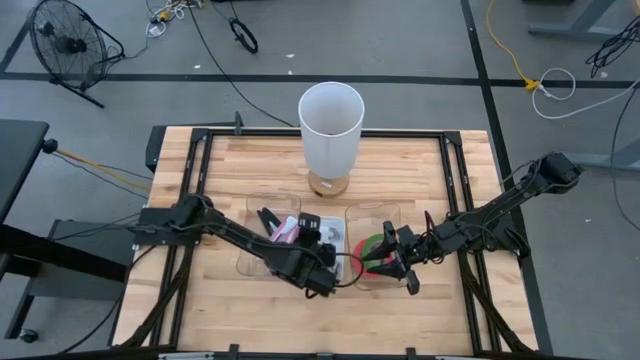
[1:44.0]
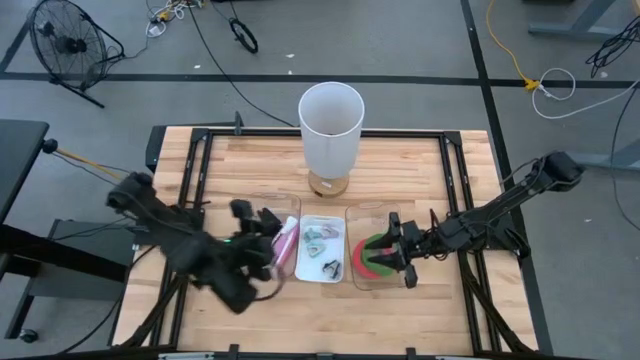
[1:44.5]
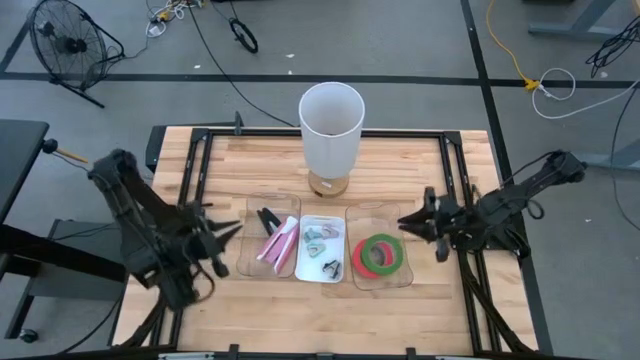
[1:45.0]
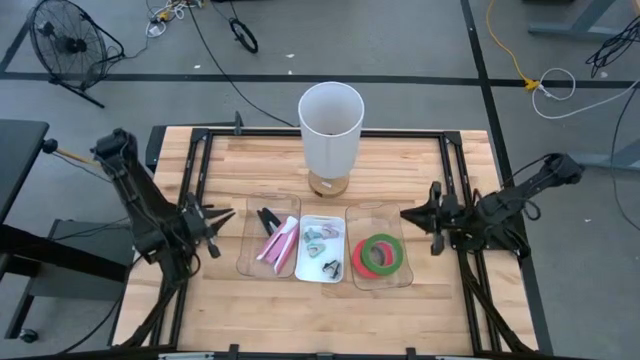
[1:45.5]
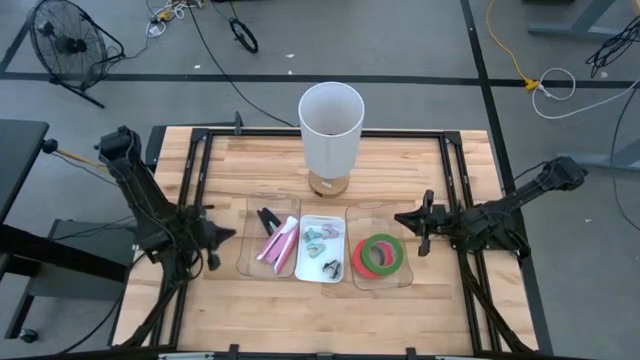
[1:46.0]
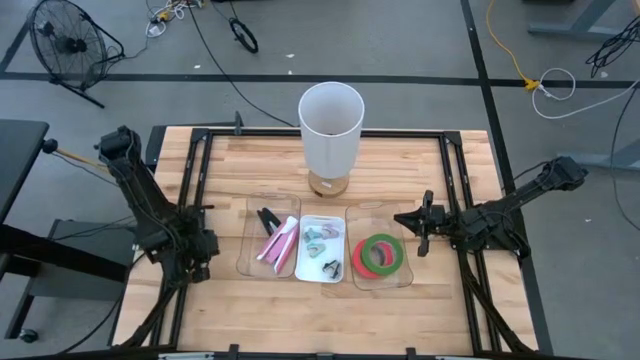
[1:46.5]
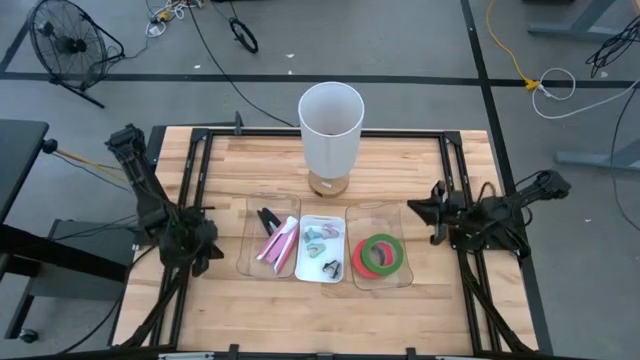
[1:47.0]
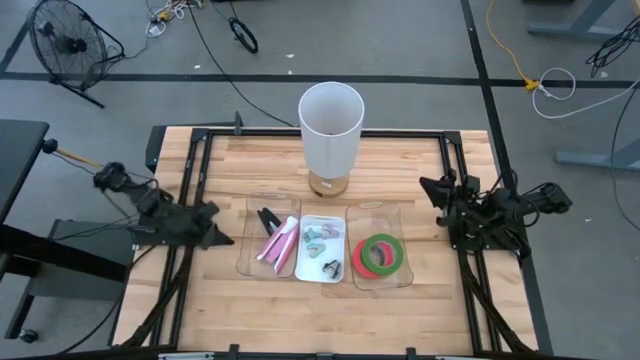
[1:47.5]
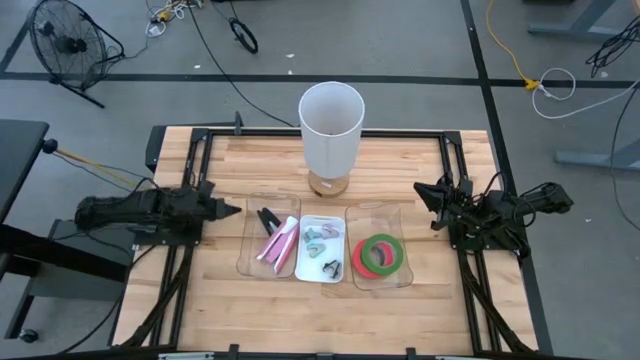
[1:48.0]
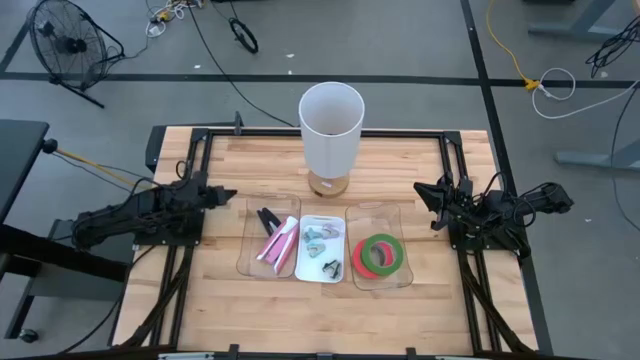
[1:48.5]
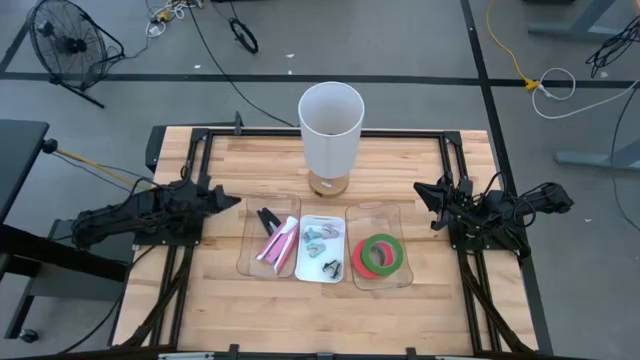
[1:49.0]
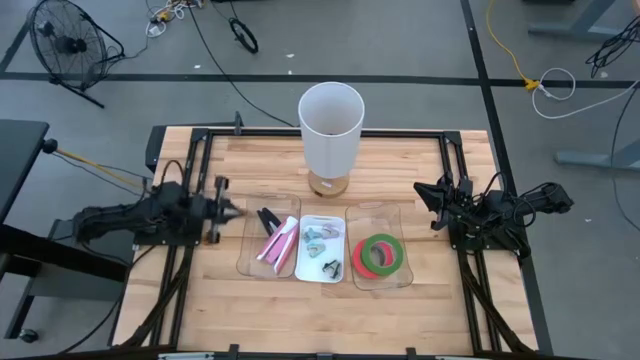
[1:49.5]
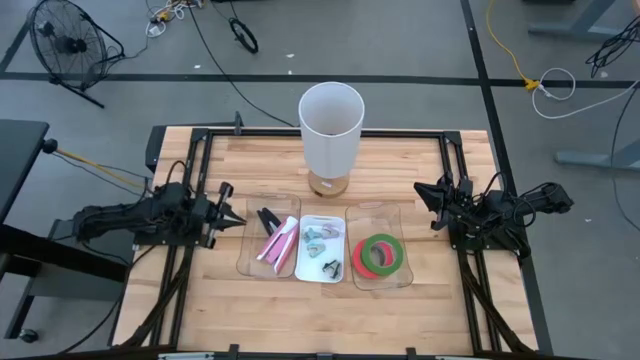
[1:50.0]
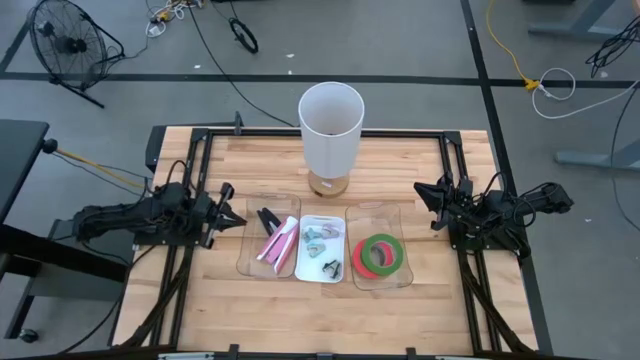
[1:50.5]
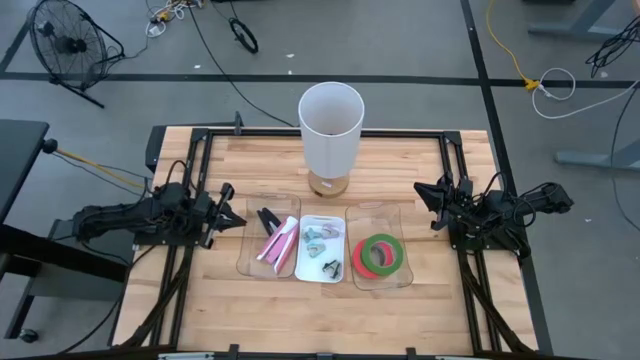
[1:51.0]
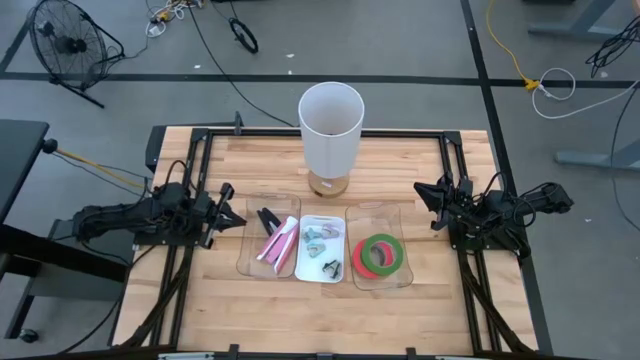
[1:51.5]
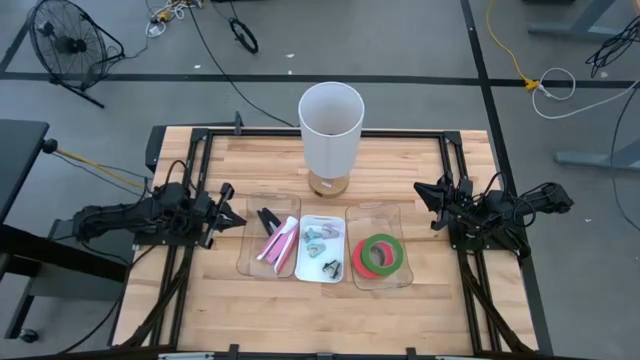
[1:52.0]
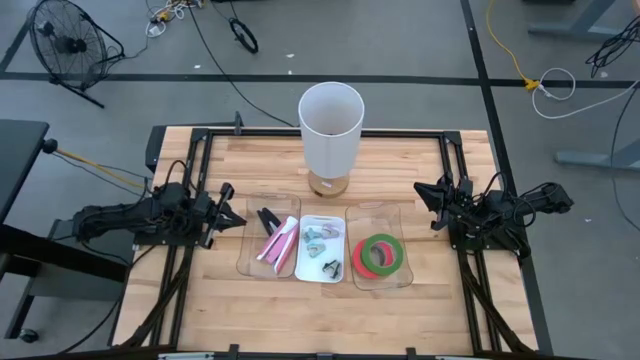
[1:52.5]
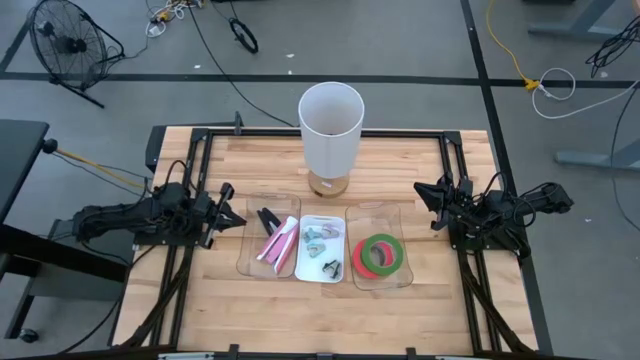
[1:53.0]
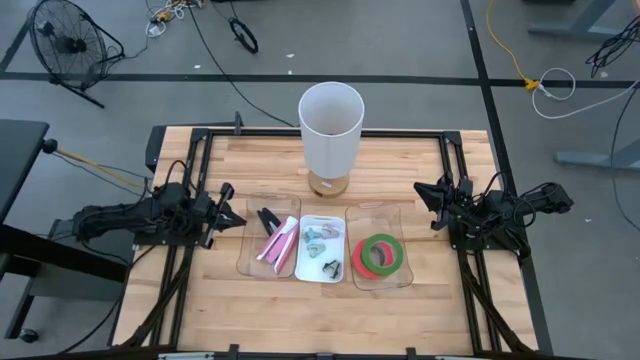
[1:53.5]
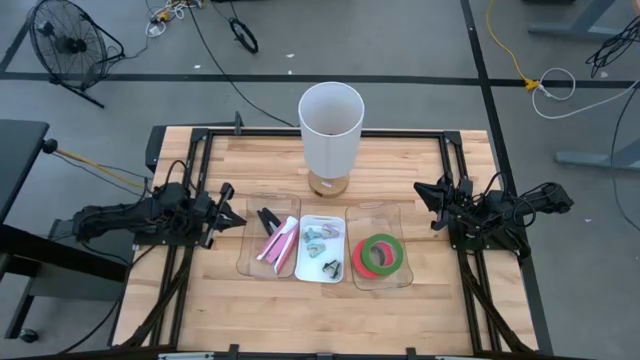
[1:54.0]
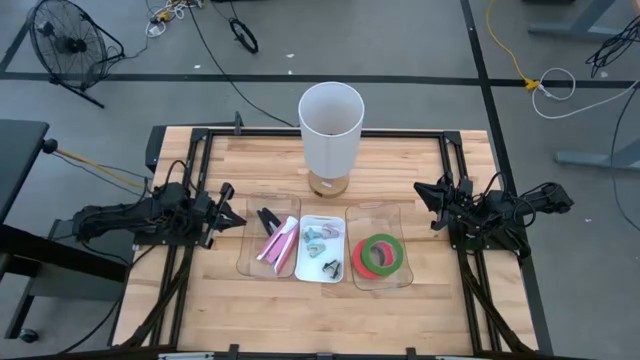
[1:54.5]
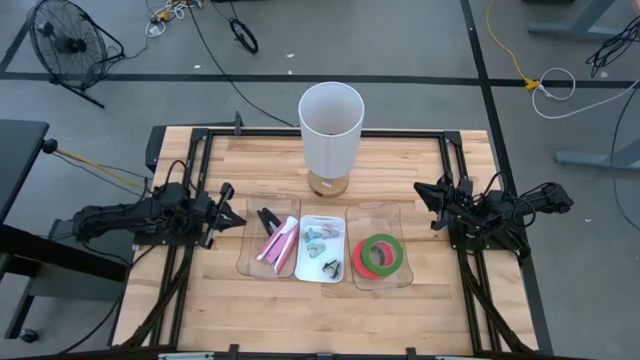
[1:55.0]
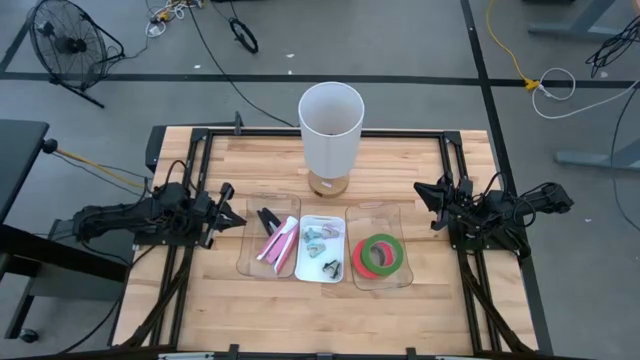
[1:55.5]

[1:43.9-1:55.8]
Task: Pick and place Stapler, Stapler remover, tape
Return to Home Position

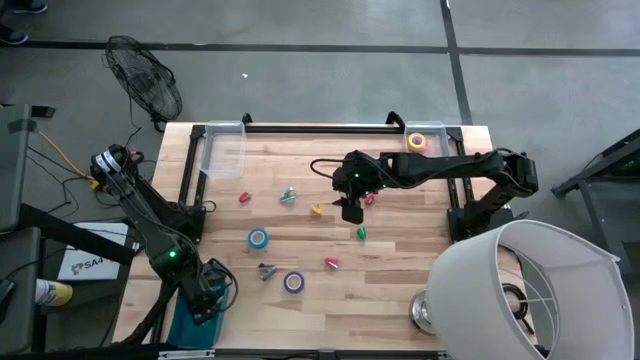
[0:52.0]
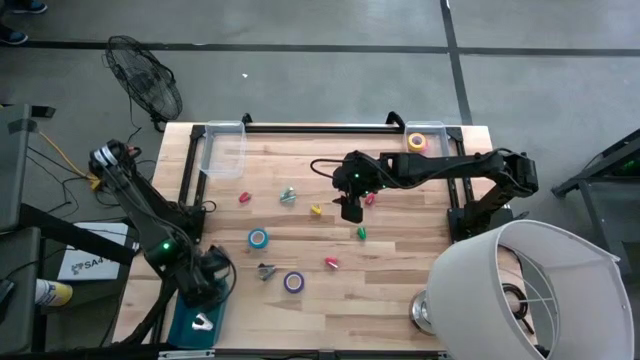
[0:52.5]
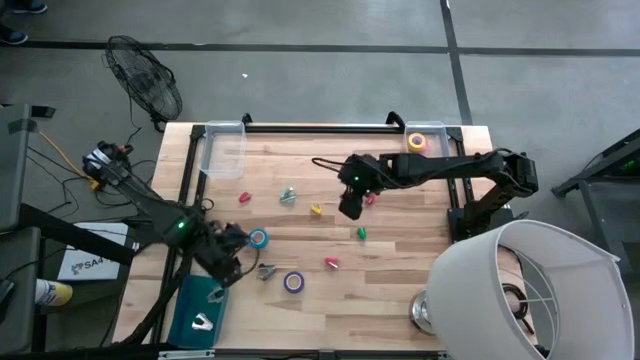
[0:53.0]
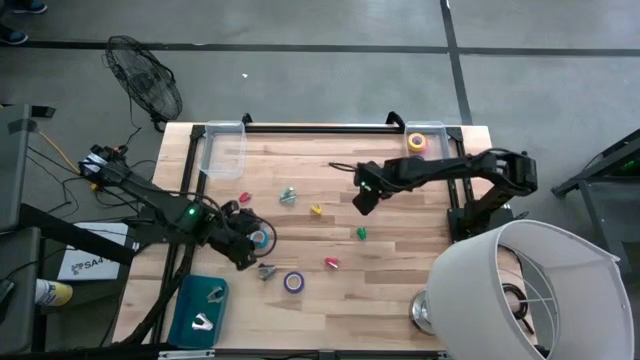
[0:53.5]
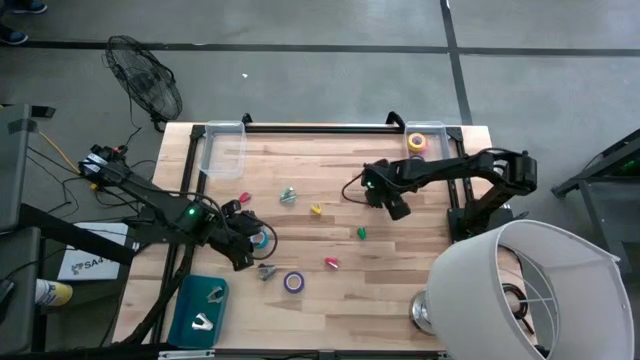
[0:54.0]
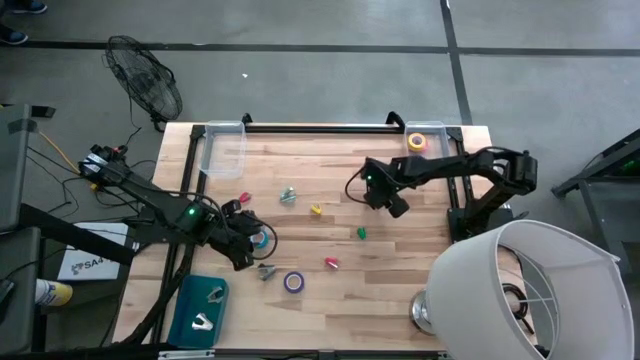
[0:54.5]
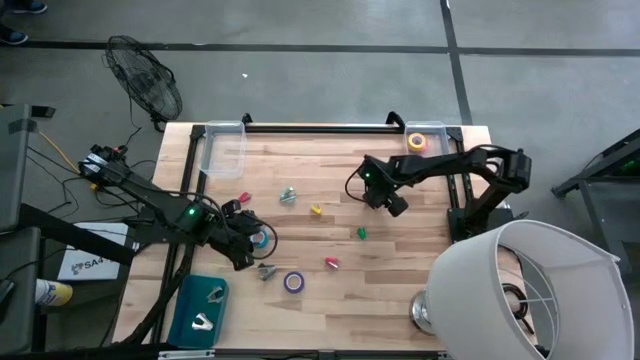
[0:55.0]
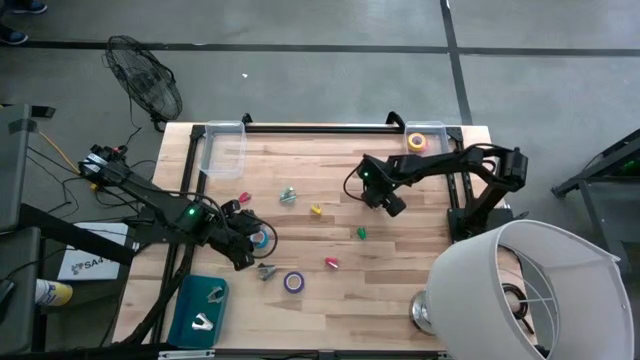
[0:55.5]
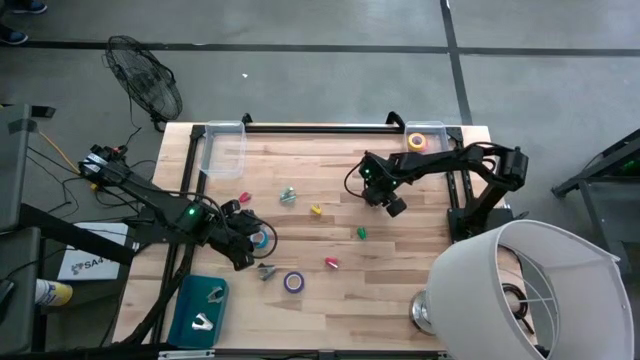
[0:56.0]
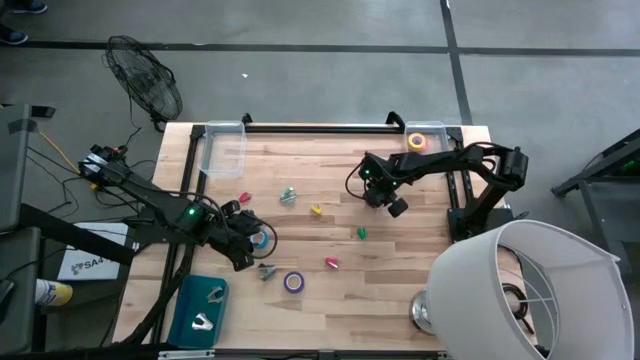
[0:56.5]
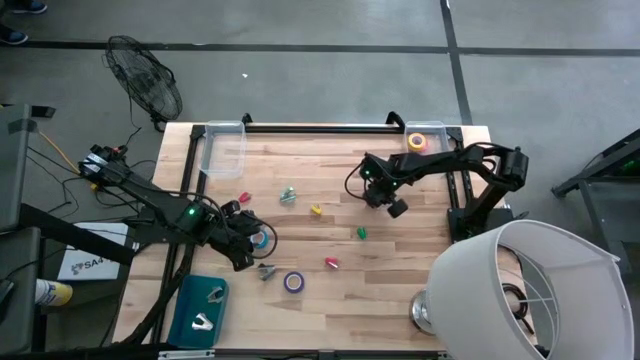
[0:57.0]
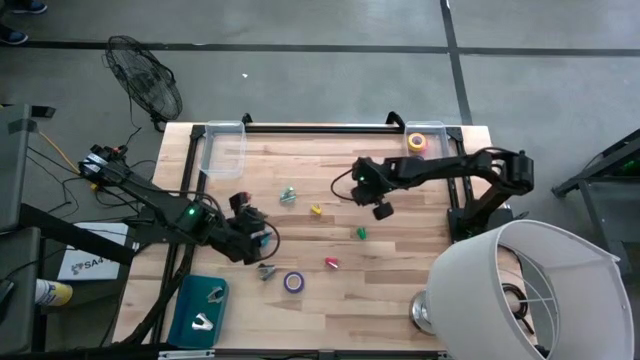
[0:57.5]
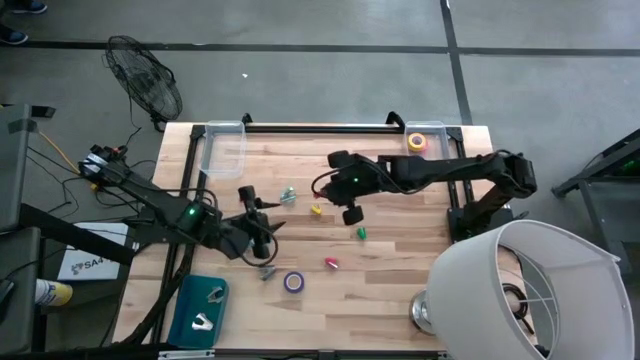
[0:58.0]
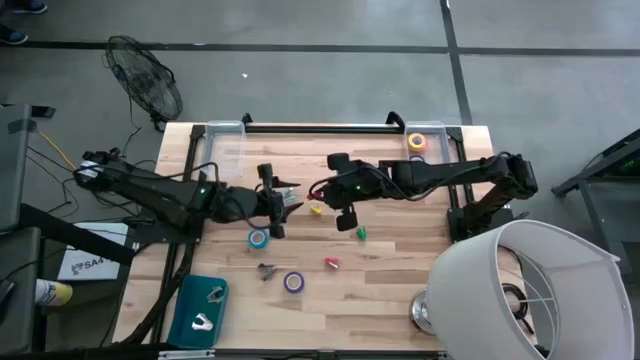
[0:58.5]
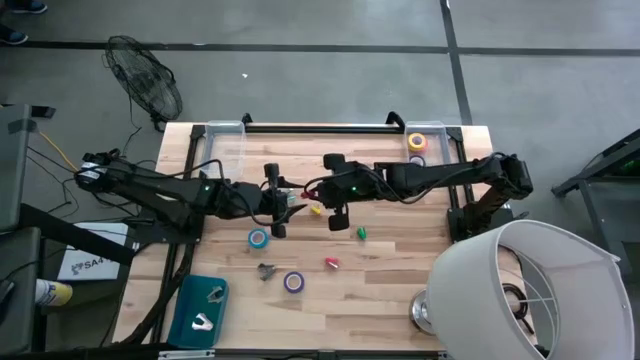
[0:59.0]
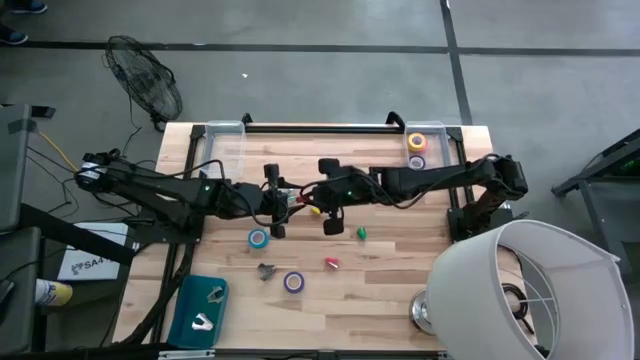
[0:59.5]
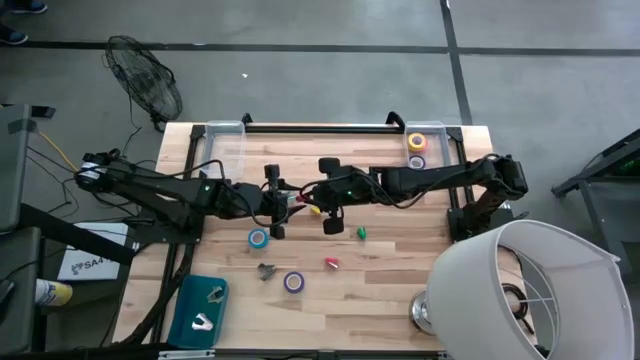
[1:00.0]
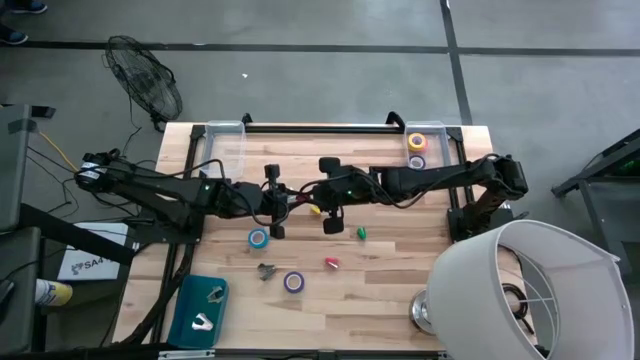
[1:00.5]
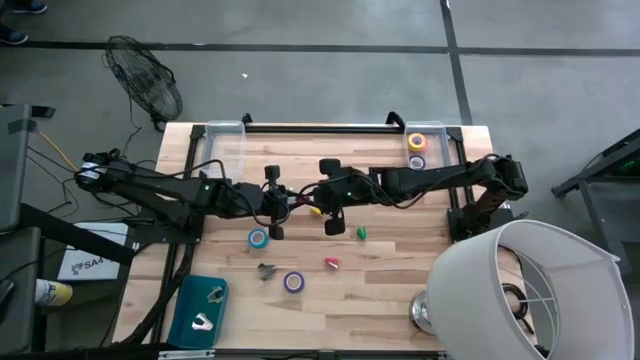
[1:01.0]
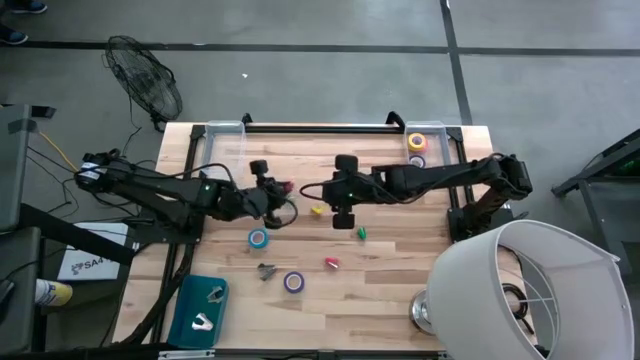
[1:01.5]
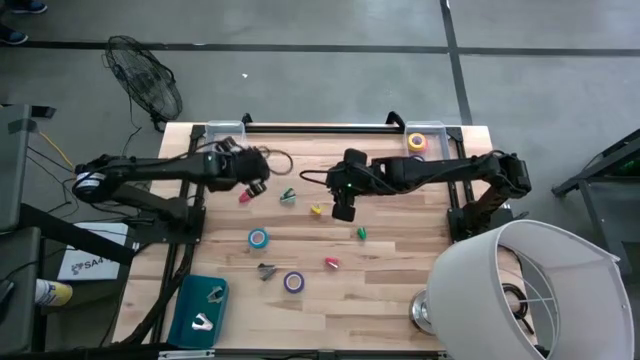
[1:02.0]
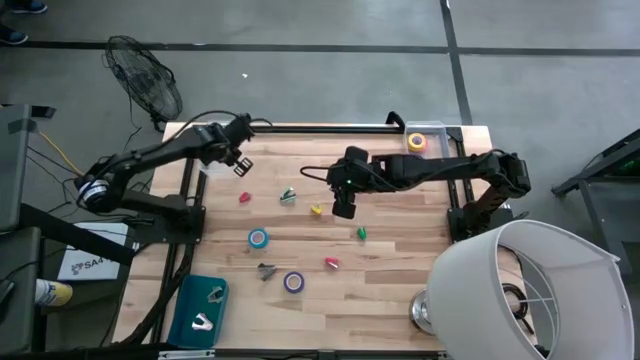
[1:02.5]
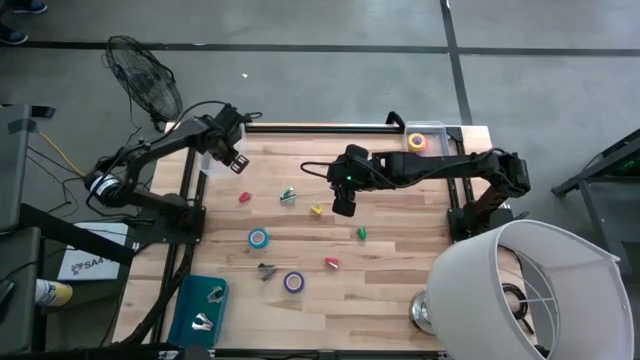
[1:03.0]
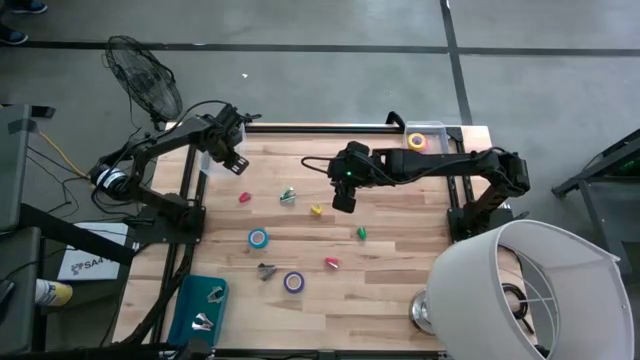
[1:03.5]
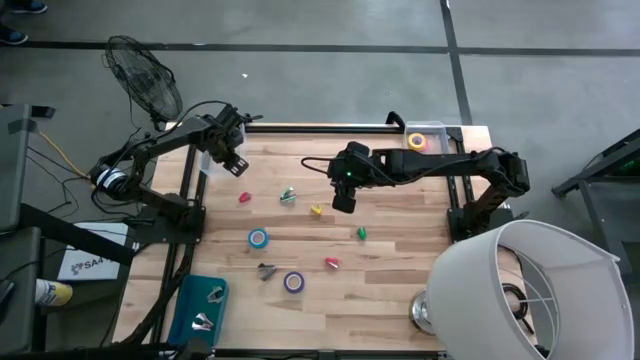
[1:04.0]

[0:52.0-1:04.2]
Task: Pick and place Stapler, Stapler remover, tape
Put the top right red stapler into the left transparent bin
